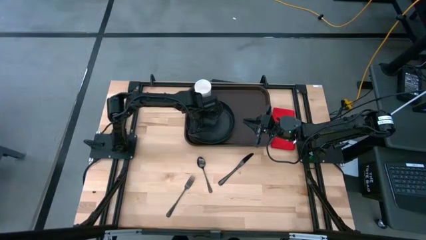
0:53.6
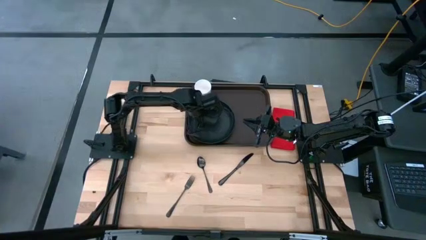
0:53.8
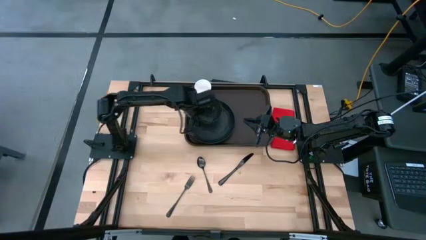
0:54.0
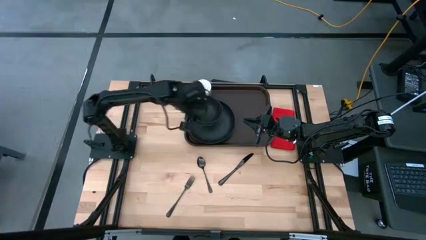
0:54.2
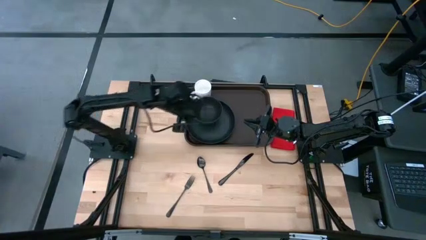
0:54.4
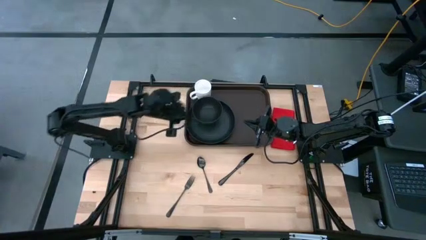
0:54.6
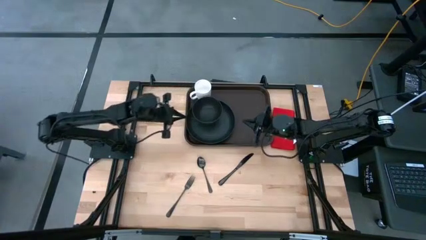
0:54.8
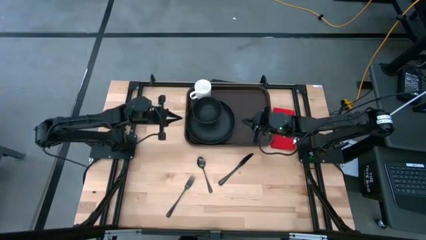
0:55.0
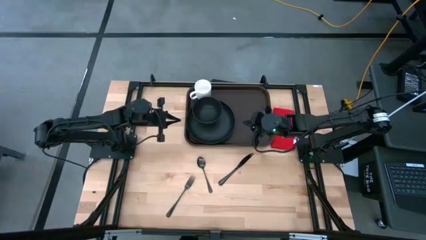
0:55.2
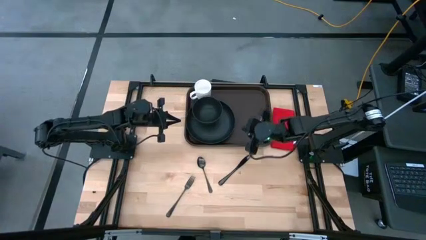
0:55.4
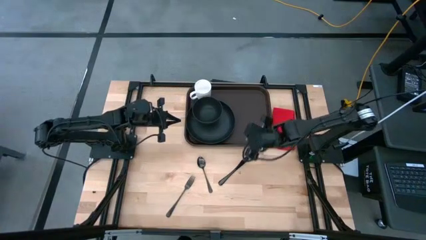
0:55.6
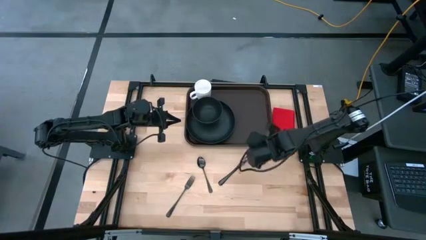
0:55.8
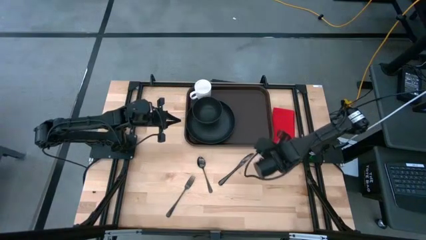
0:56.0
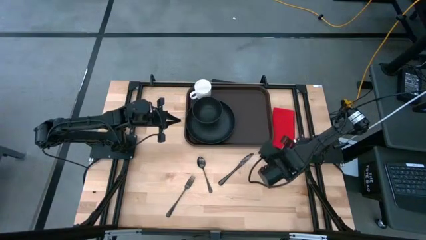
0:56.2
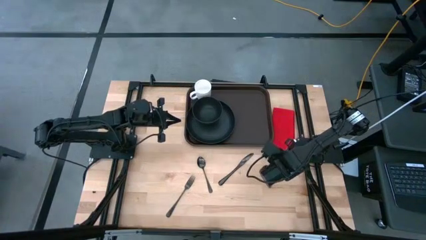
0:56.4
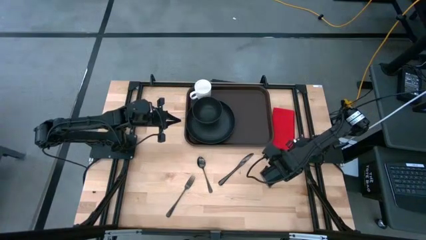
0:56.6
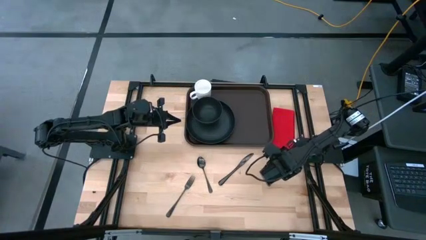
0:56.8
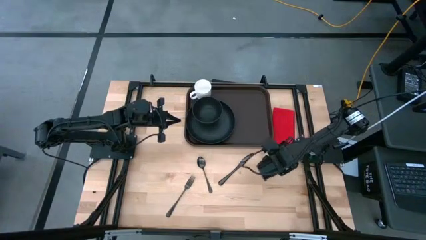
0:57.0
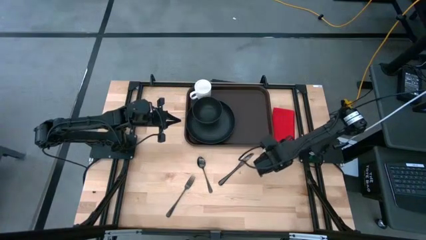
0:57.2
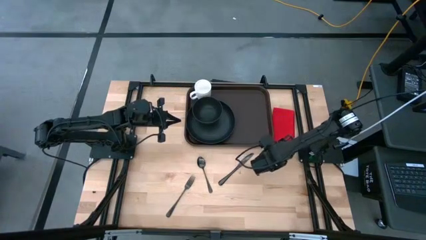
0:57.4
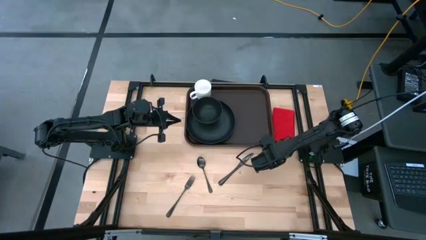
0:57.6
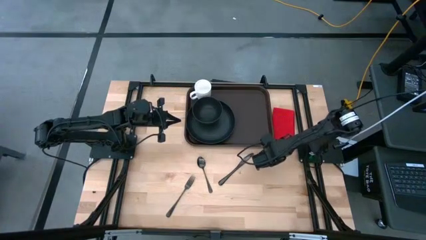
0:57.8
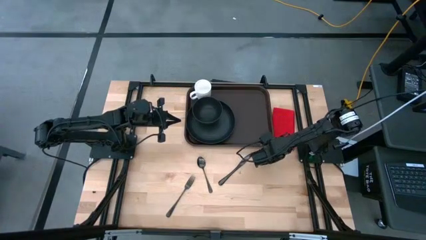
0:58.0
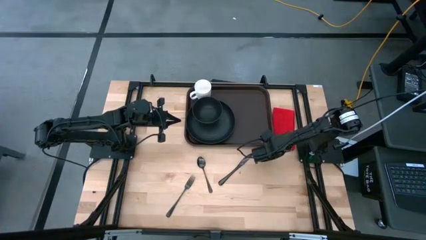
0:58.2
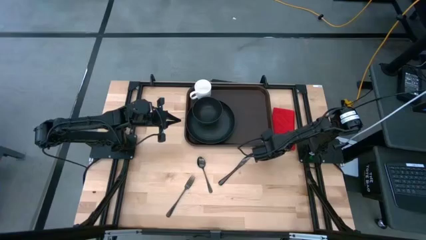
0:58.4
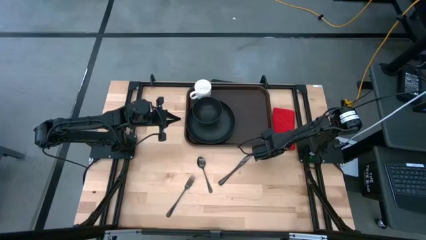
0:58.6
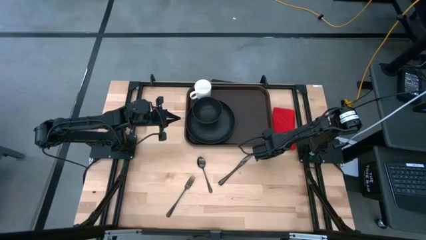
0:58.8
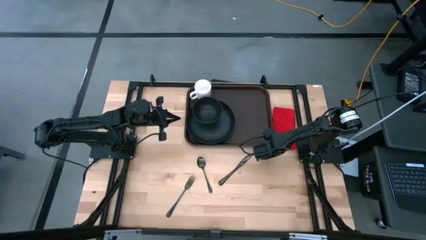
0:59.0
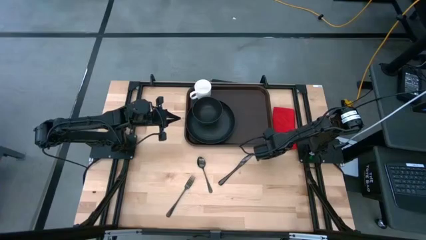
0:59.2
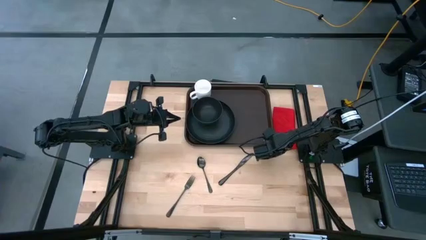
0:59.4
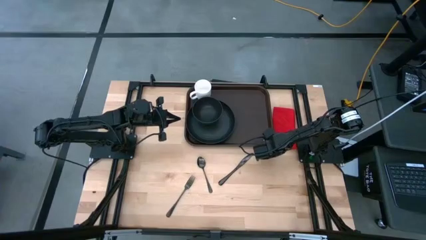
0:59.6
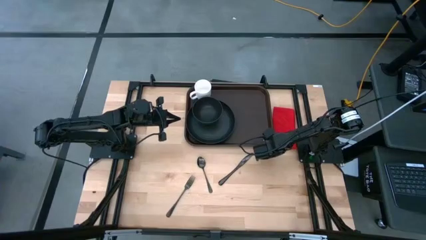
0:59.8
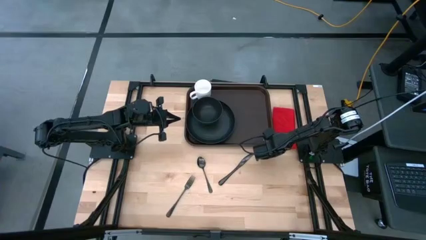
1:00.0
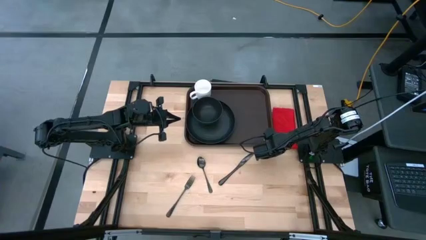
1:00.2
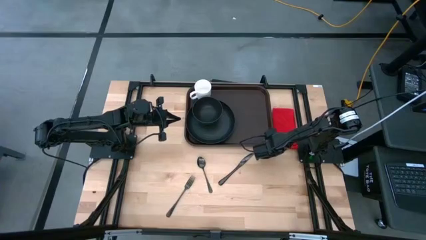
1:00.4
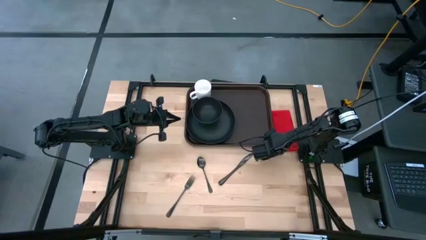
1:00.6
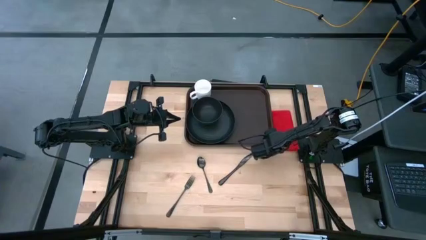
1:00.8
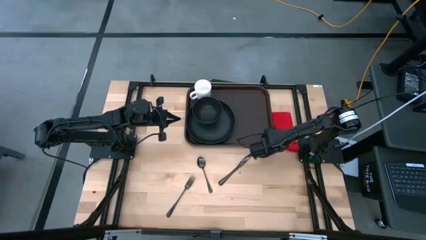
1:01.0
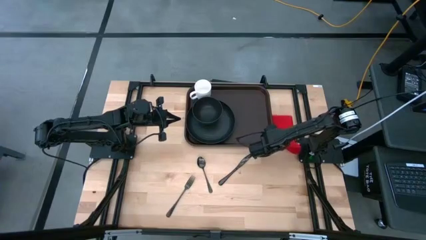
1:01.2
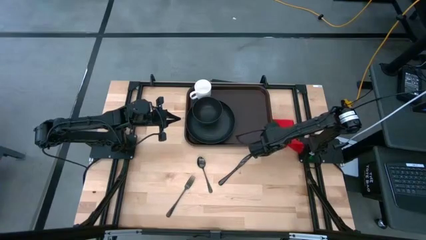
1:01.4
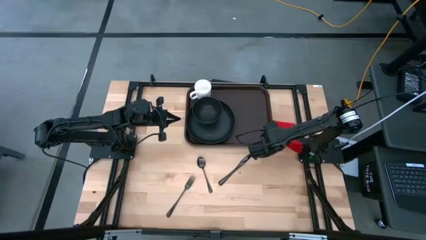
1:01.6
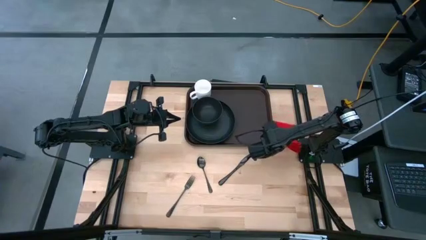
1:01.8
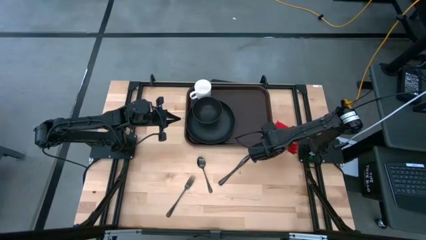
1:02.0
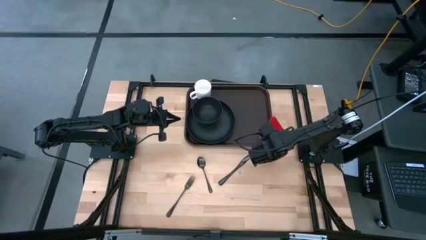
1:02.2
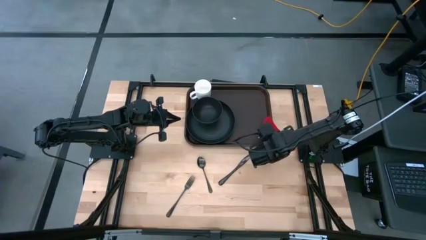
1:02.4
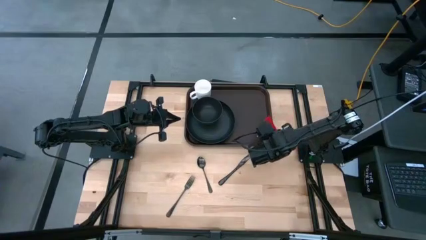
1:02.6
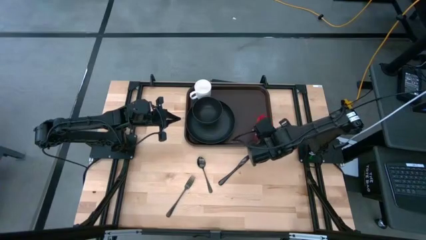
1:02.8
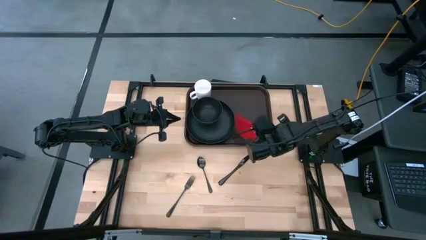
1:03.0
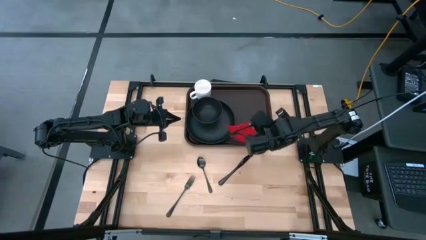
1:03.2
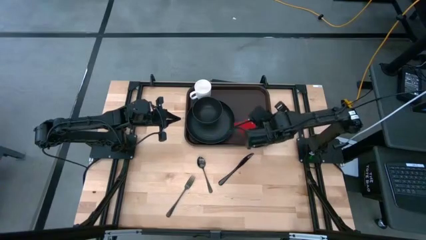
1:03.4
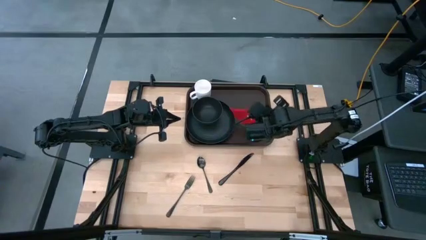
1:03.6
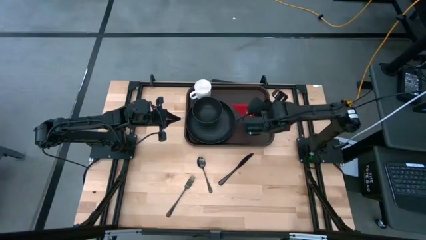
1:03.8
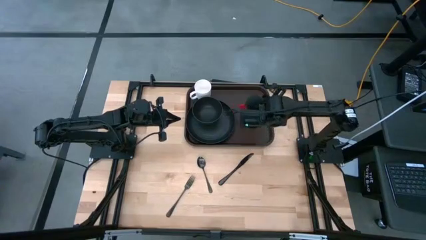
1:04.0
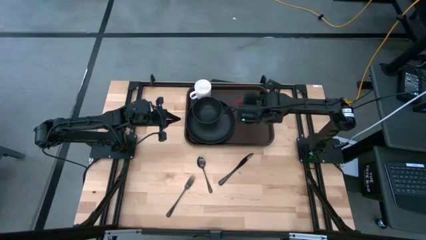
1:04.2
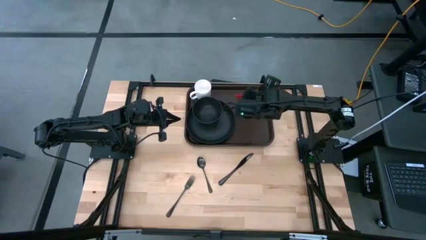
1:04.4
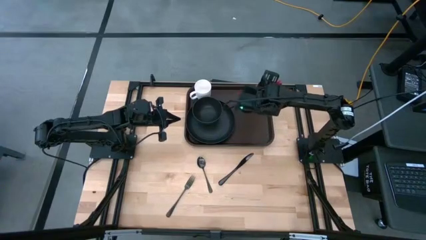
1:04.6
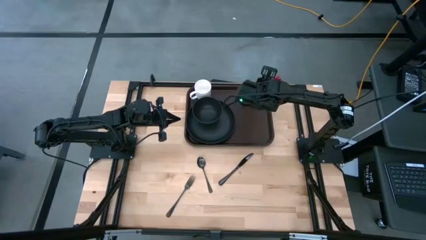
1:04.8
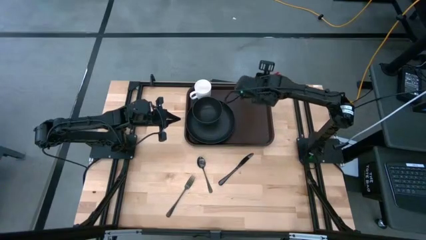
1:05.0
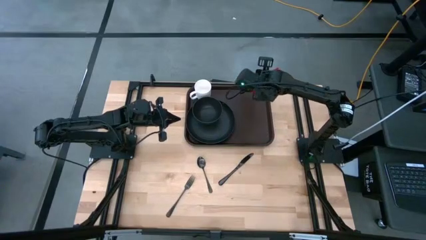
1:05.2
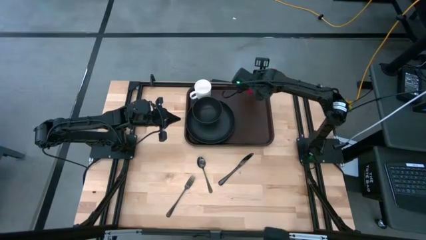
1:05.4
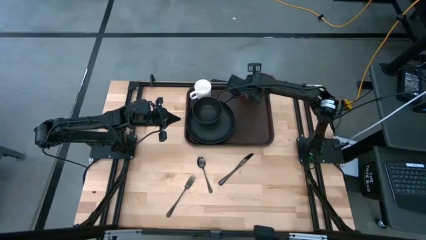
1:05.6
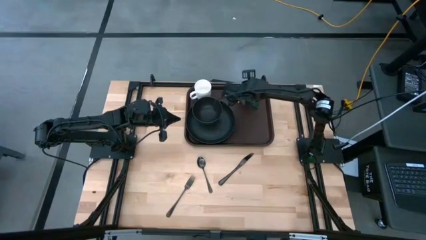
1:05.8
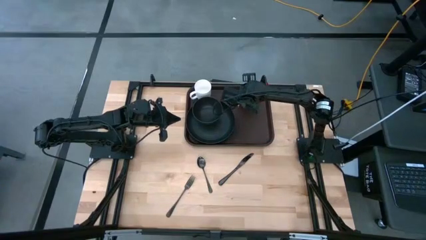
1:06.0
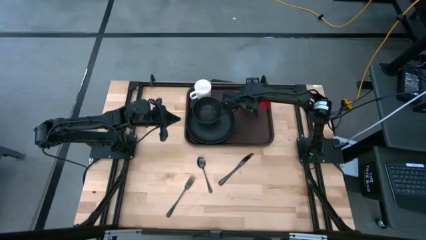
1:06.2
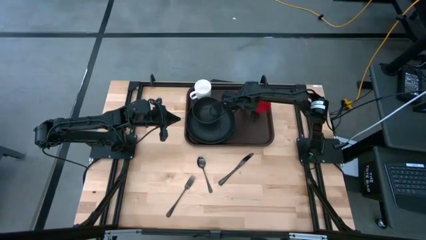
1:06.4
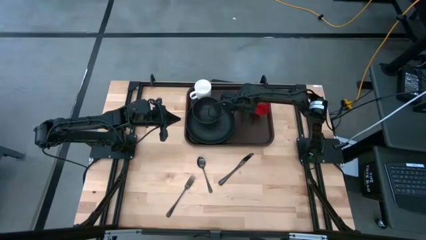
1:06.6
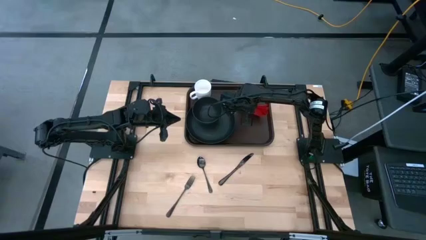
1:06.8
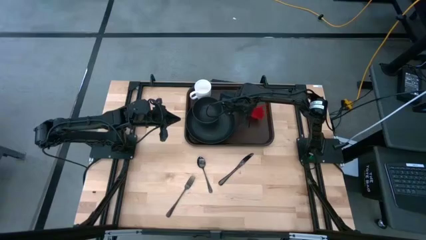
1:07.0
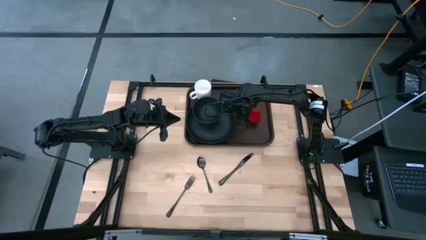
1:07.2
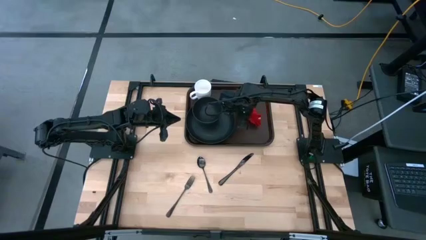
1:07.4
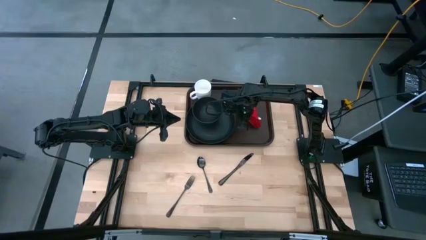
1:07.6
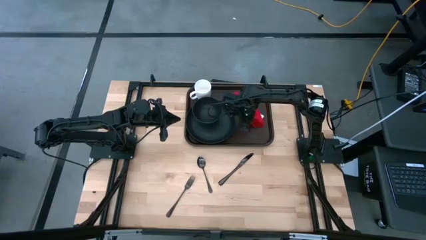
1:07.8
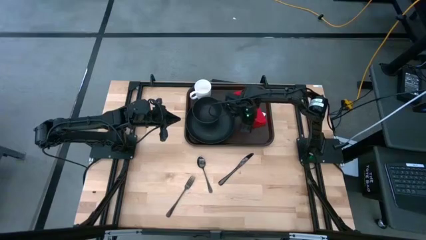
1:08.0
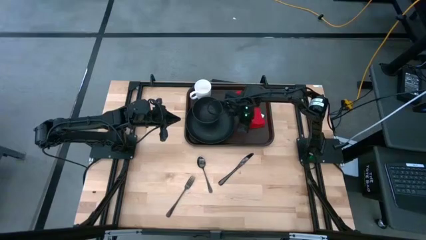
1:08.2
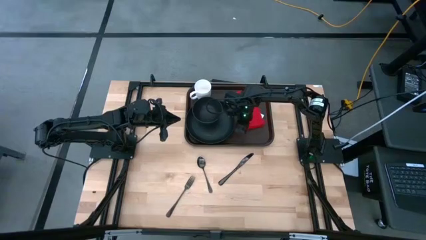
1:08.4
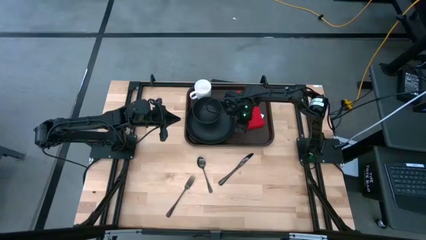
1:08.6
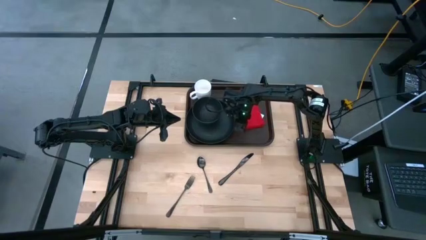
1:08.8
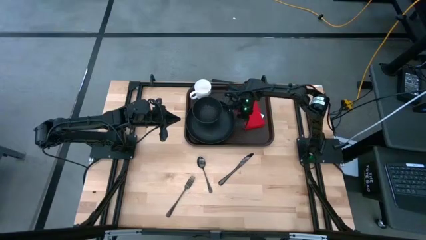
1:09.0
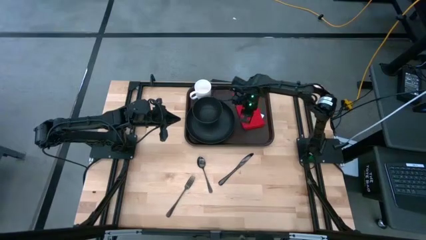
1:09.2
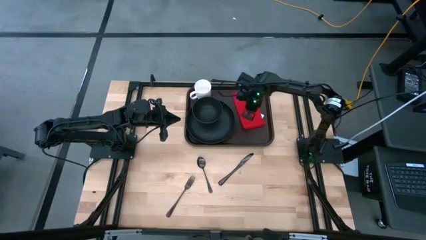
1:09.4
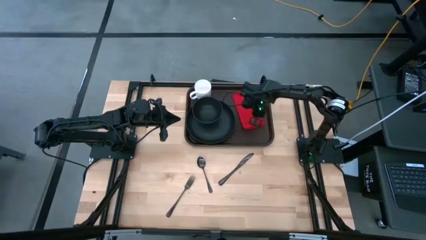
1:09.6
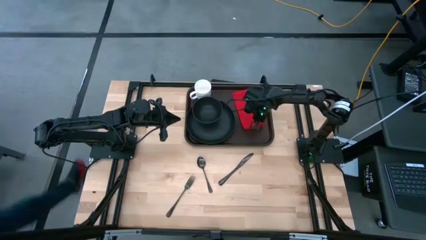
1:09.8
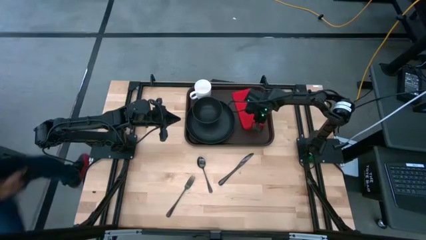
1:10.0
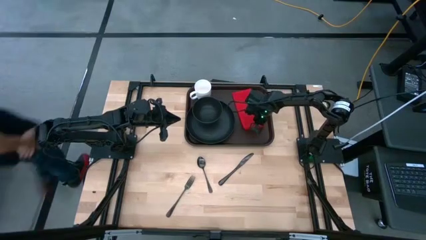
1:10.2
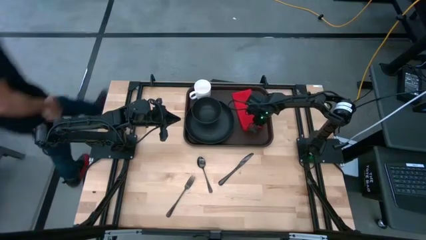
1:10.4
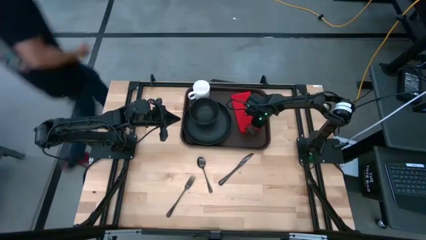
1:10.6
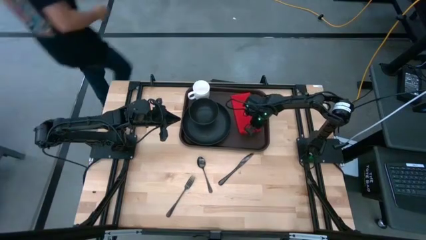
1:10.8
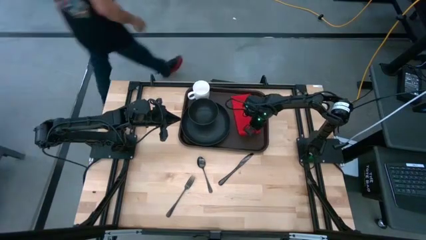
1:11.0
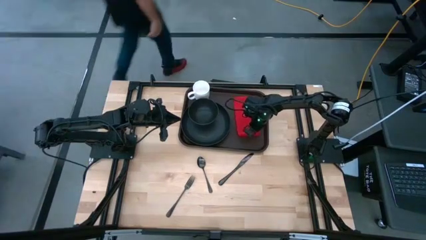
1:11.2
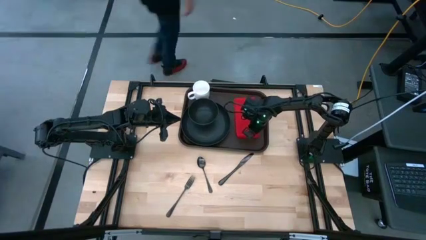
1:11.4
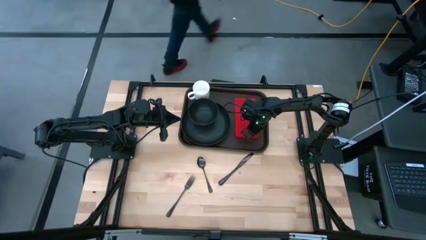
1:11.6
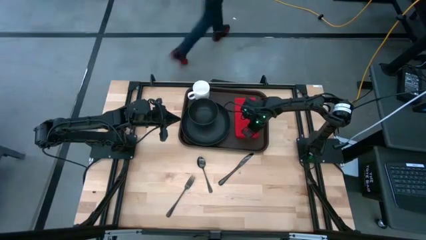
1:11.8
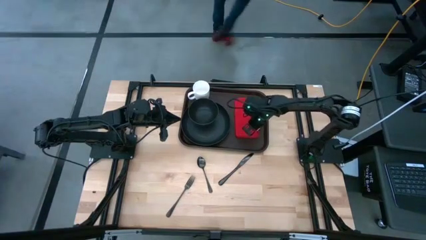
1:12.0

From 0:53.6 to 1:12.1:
Task: Set up tray
Put the red napkin on the brown tray to the right of the black plate
